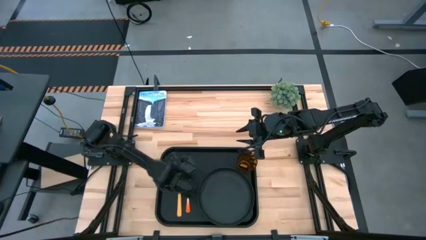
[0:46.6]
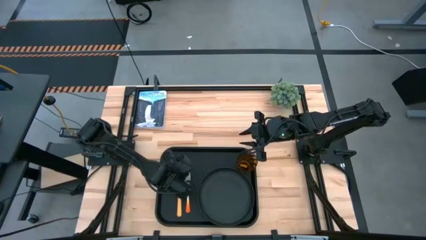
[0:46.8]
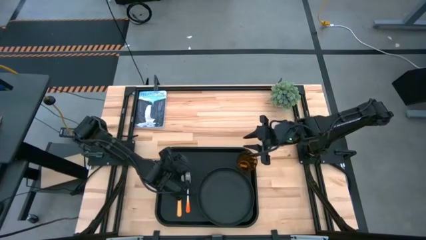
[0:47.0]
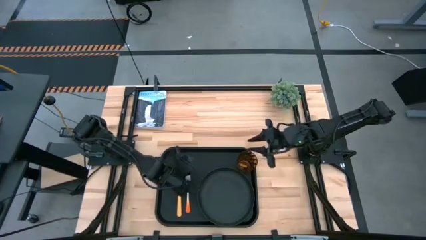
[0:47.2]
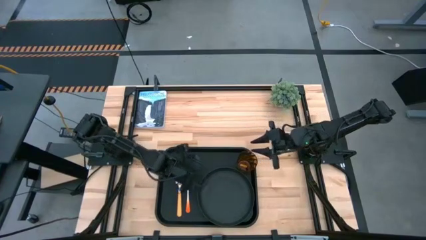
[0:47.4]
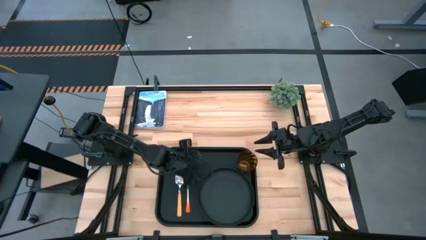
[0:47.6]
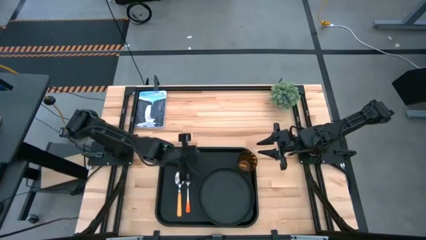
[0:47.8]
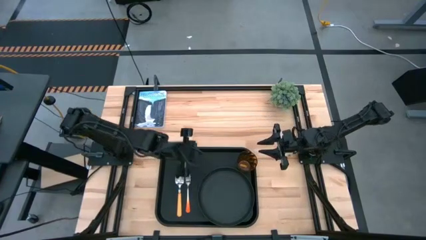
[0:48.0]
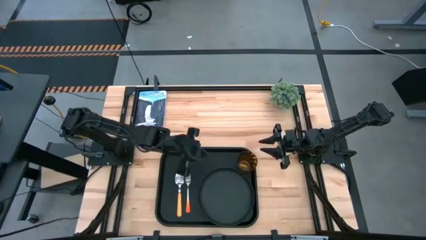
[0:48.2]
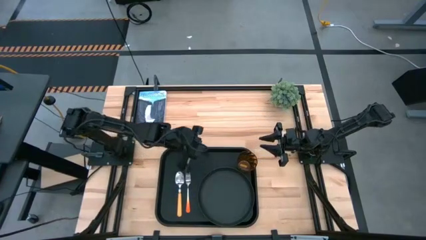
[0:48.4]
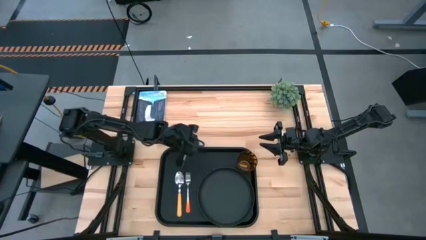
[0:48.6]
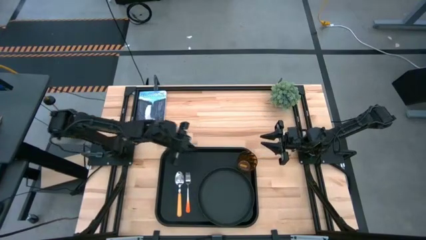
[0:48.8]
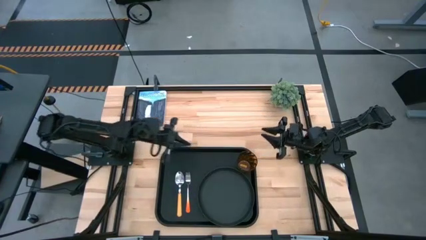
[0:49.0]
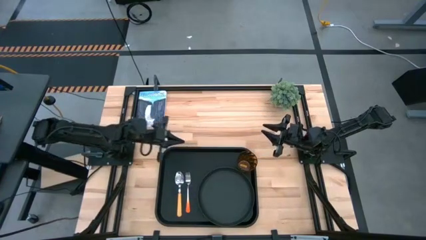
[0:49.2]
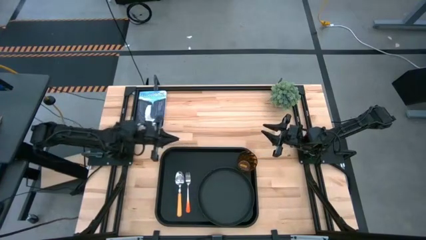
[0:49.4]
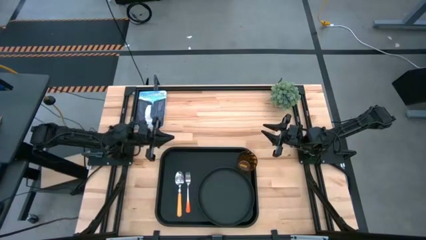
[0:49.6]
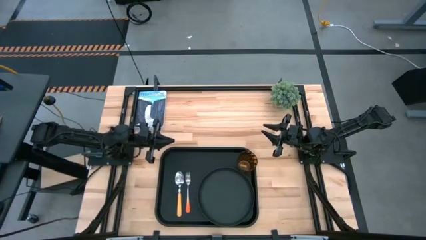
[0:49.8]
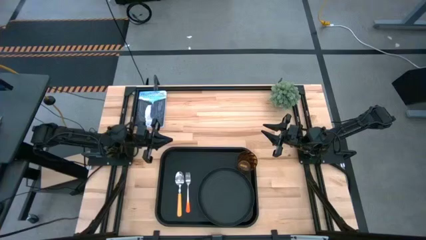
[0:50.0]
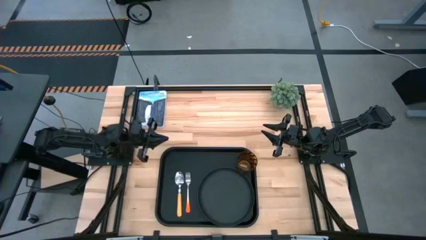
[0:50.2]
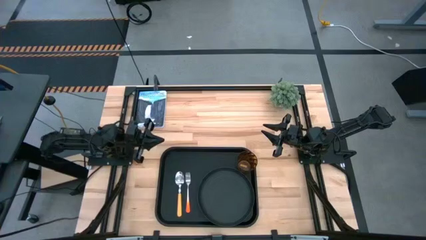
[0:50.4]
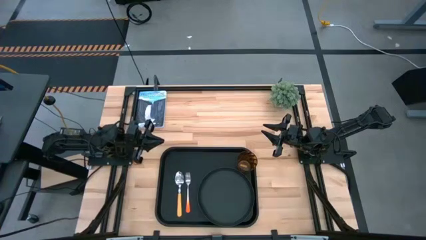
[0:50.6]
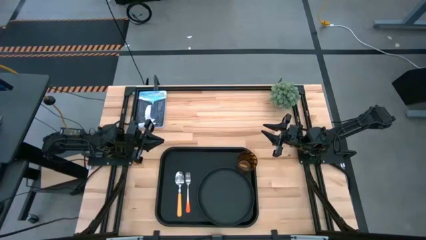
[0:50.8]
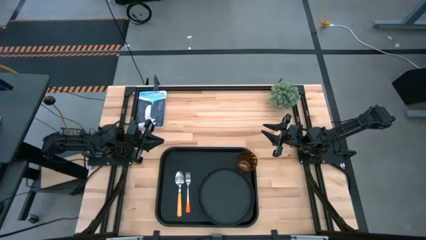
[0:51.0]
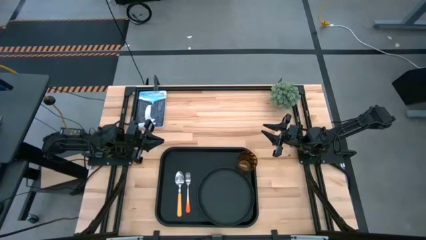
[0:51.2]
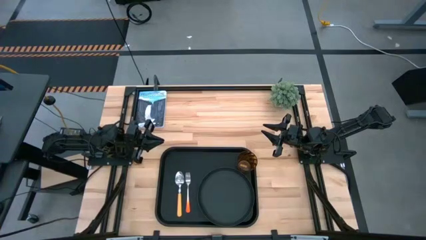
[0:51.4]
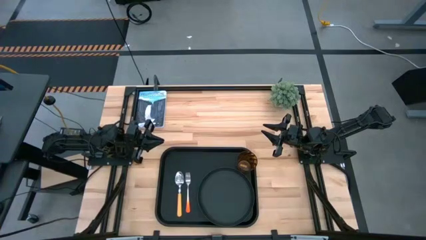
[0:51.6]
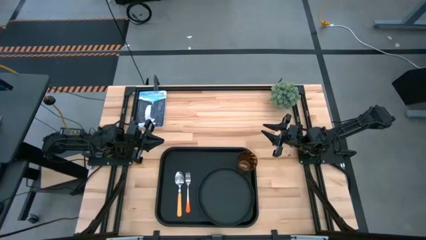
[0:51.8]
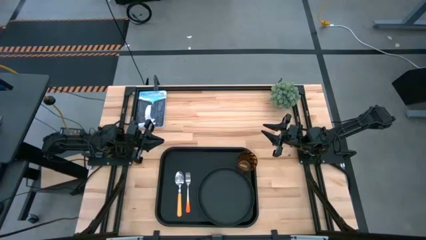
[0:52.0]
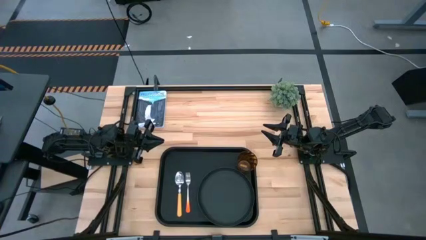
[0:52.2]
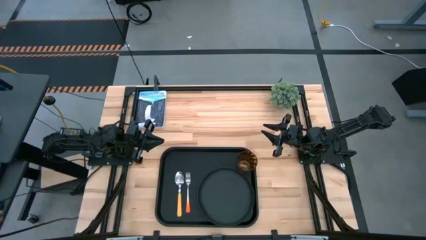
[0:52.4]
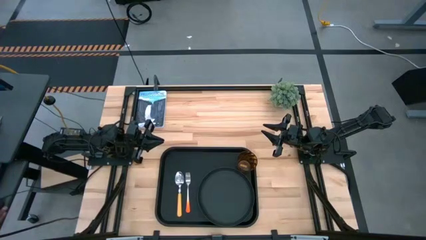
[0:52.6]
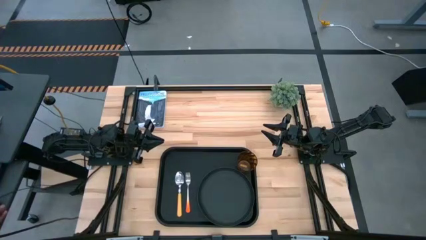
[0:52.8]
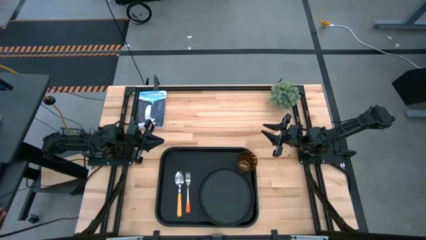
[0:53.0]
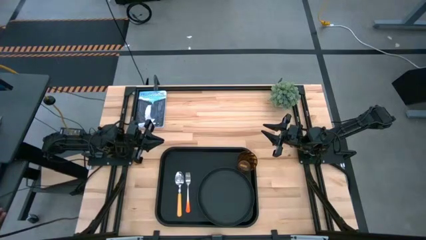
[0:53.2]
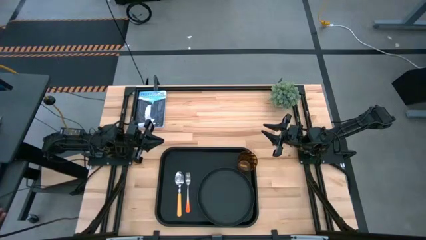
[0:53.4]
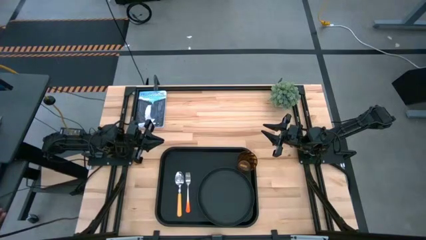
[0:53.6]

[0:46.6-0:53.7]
Task: Pick and place plate/cup/fork/spoon on tray
Return to Home Position

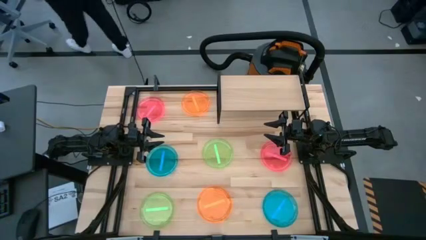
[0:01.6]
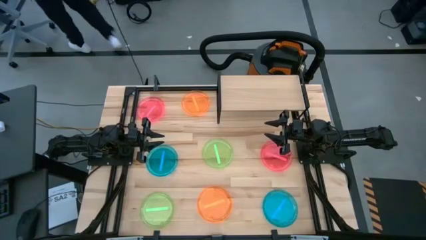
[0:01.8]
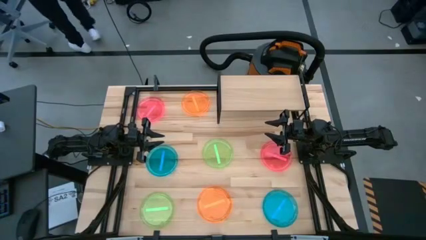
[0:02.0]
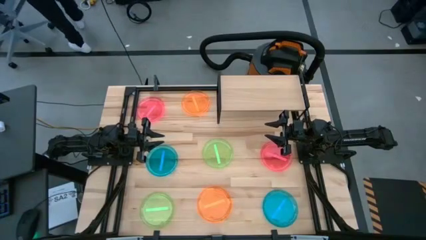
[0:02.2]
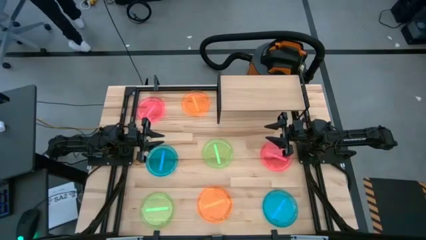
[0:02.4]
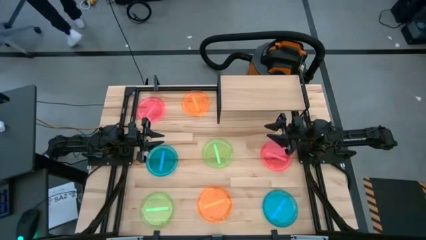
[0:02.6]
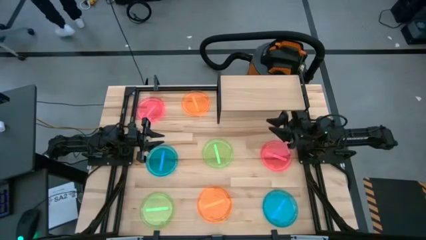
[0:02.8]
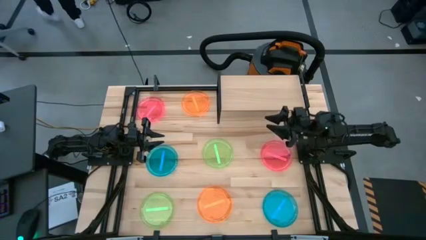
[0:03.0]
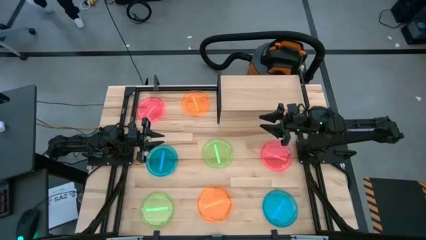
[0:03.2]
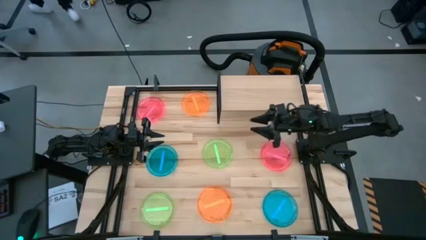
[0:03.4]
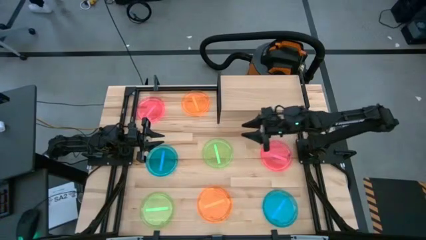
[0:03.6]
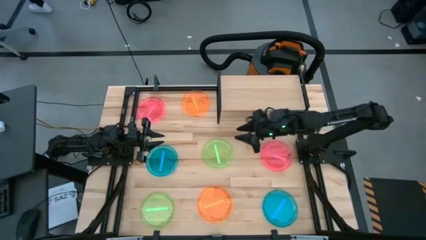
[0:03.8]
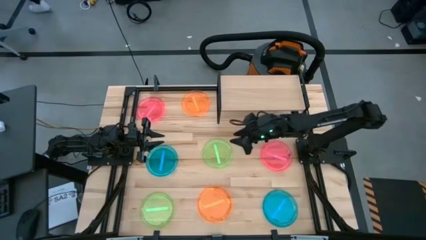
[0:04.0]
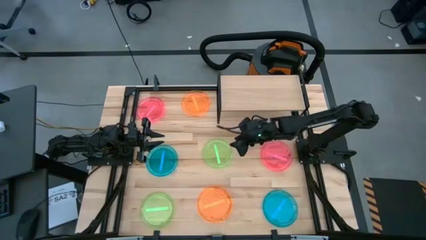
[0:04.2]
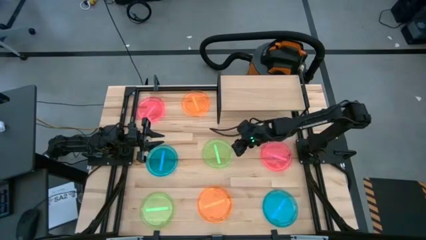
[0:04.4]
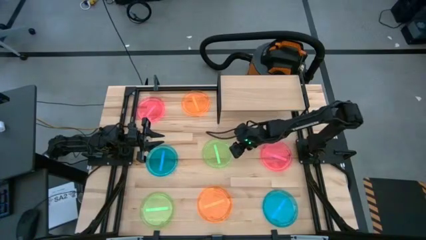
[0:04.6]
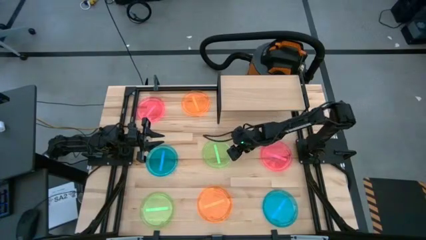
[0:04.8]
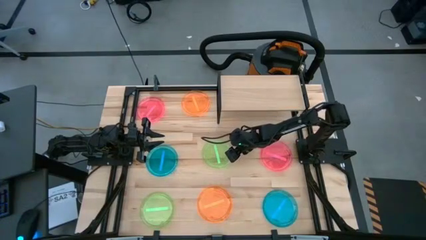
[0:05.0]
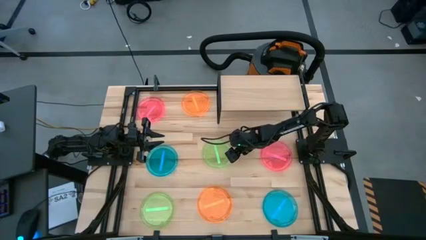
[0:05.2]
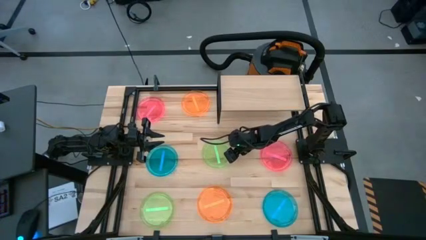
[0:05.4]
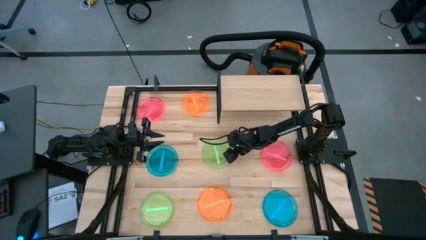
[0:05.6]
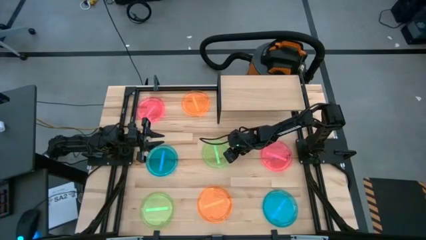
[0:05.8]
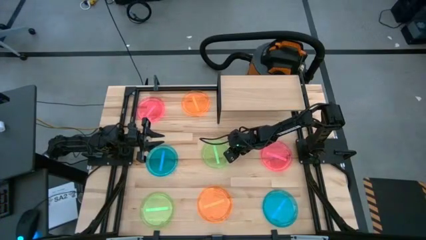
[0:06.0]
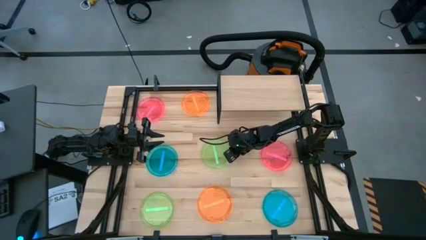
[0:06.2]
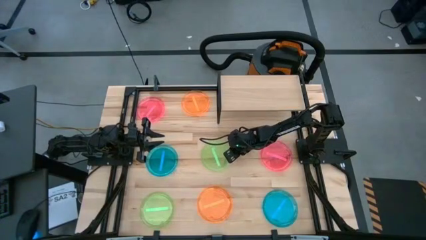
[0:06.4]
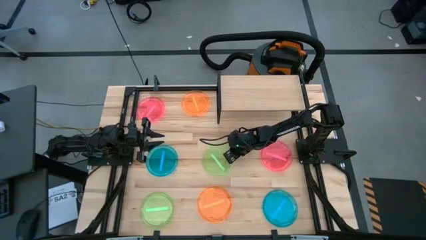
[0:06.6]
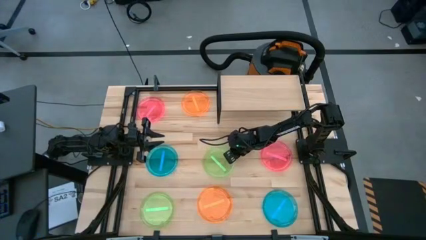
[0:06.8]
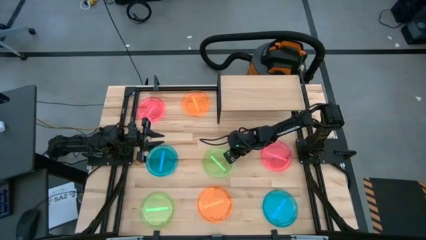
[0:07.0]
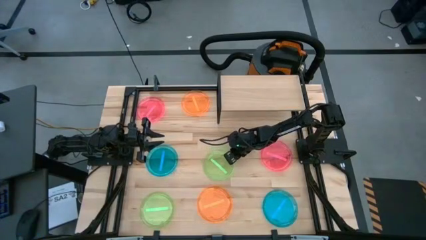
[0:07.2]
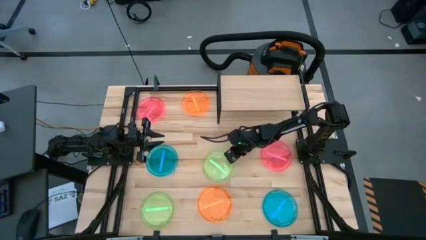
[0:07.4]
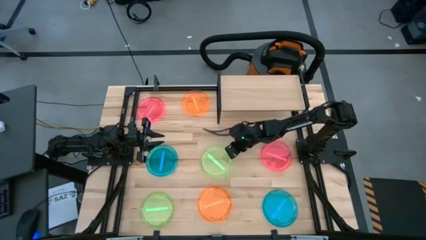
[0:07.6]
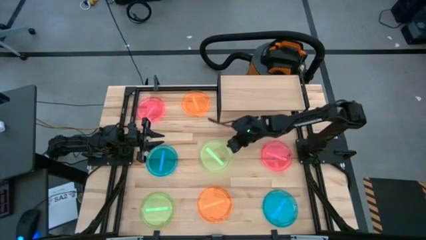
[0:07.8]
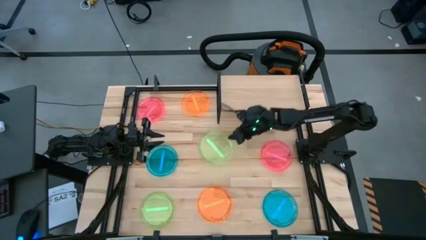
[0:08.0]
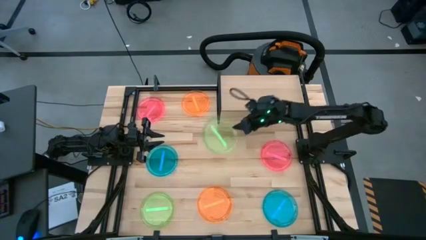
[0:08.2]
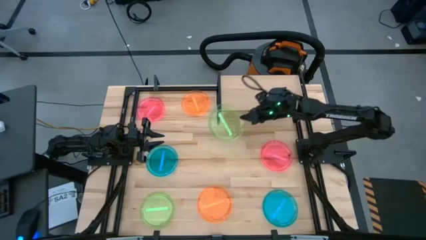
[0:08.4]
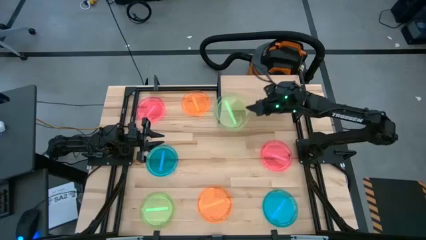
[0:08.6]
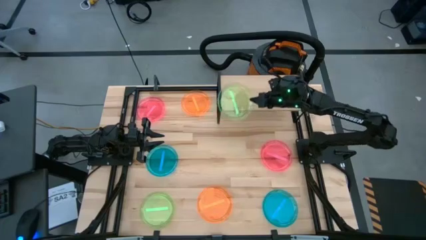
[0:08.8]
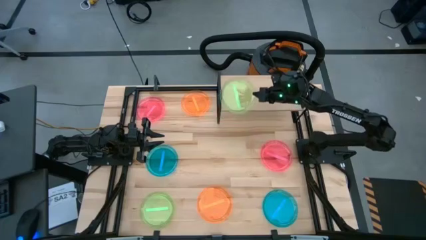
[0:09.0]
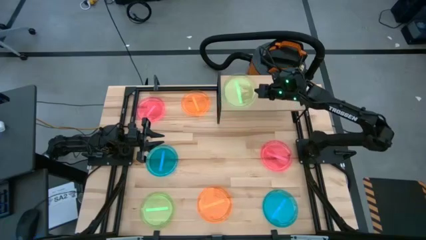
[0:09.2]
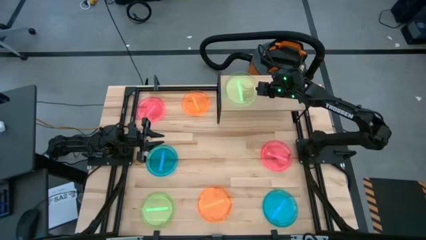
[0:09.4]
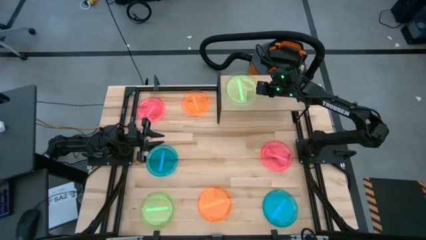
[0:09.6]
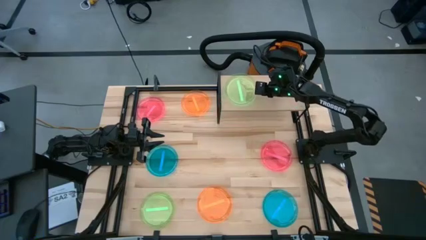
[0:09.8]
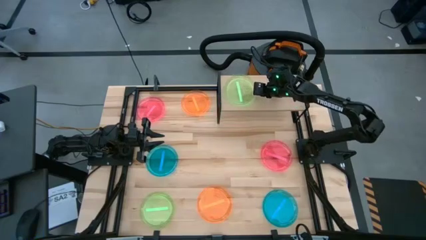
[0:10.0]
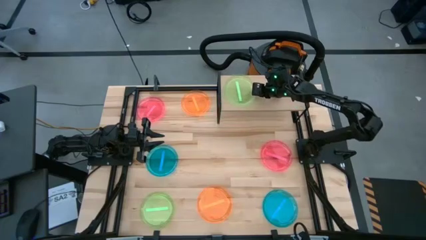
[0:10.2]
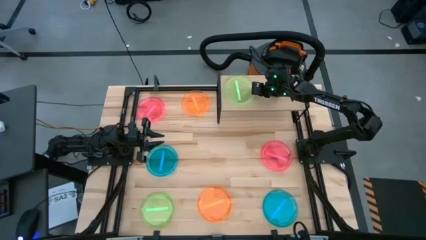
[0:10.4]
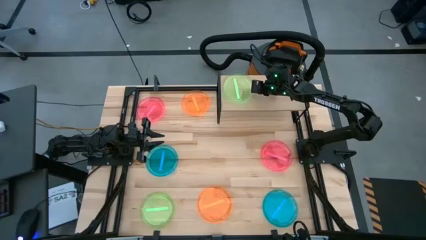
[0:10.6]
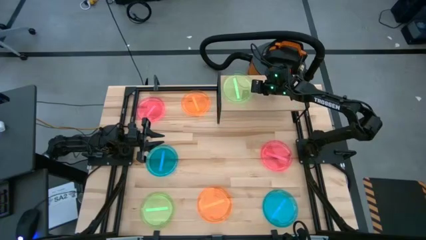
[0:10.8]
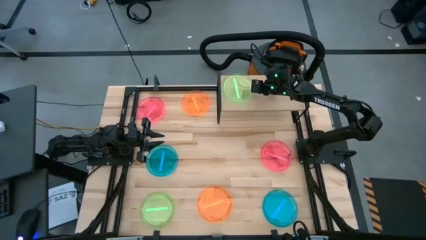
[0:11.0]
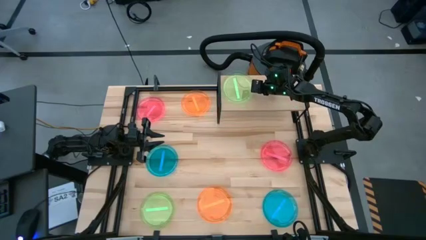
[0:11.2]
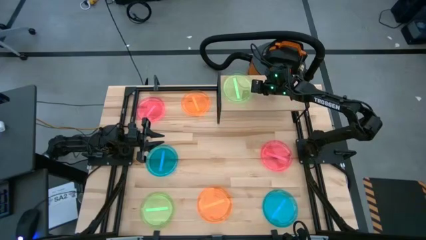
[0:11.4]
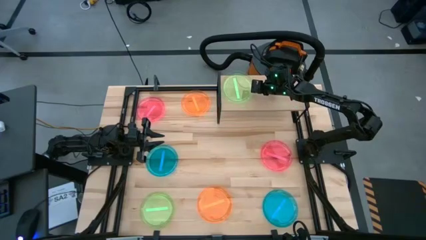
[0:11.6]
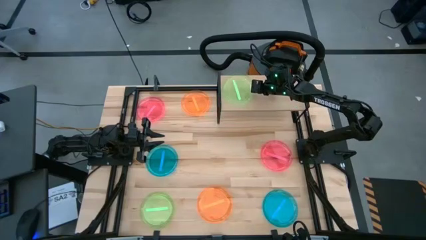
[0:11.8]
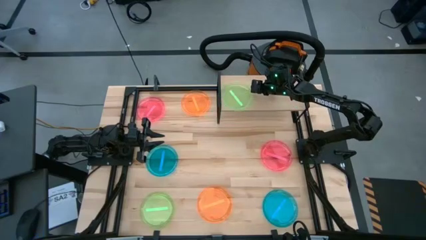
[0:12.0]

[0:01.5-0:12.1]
Task: Place and stack plates onto a shelf
Put the top green plate on the shelf
